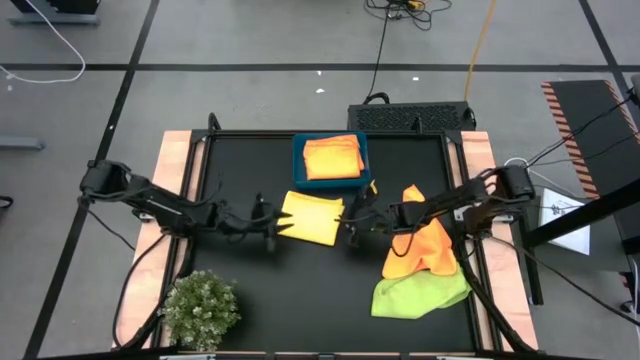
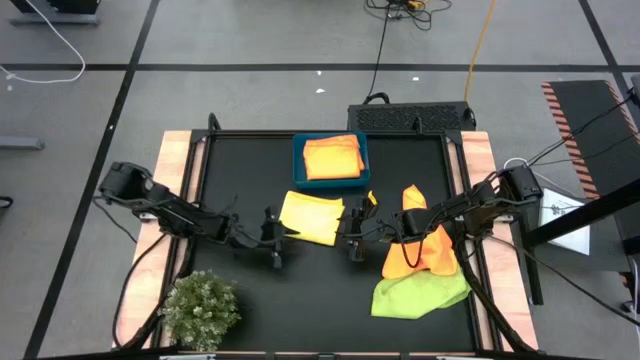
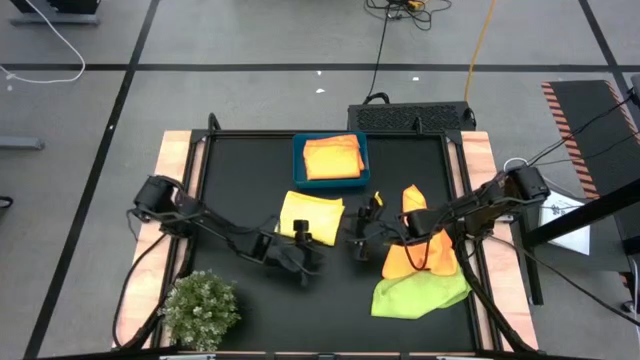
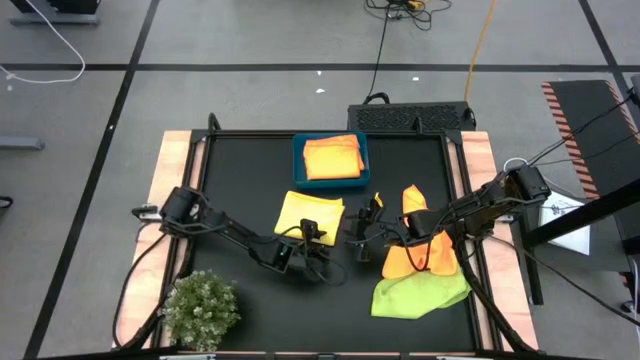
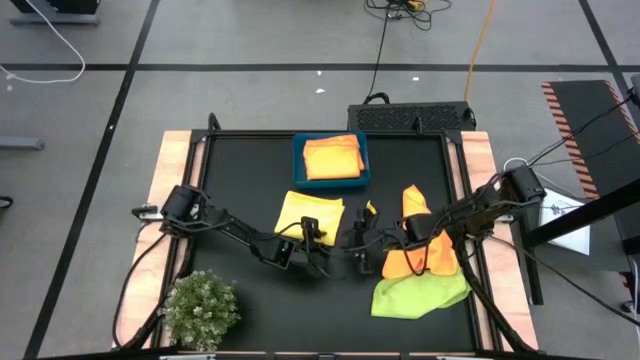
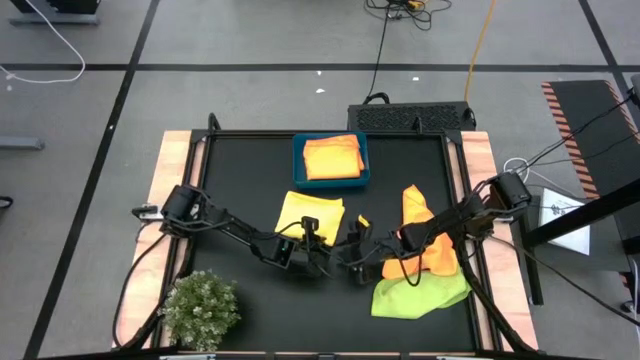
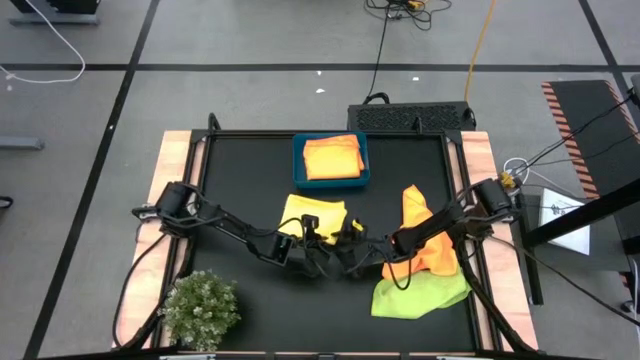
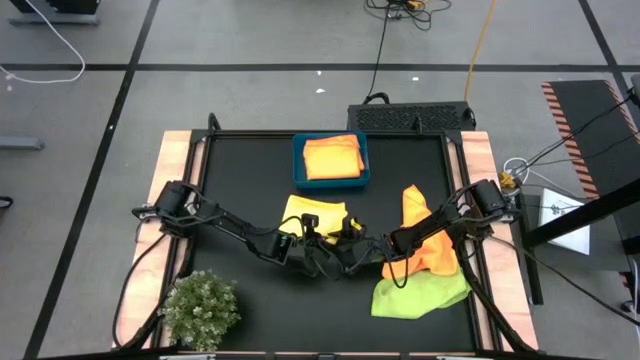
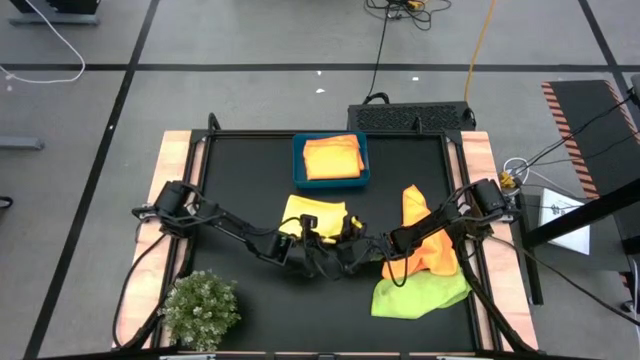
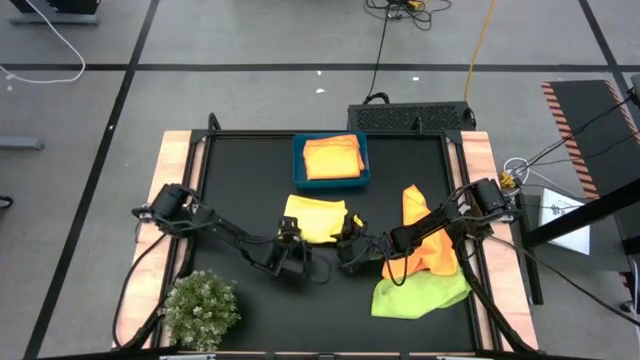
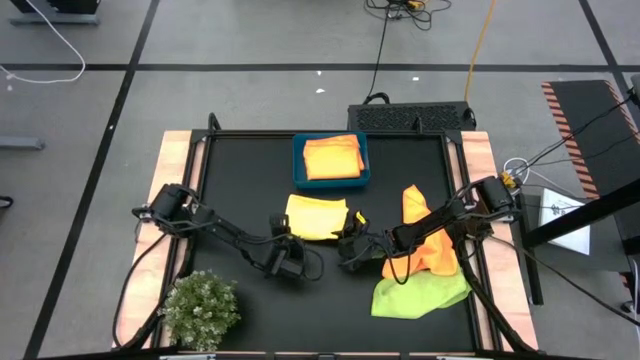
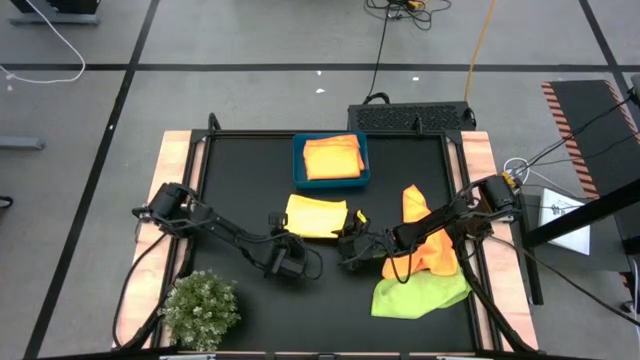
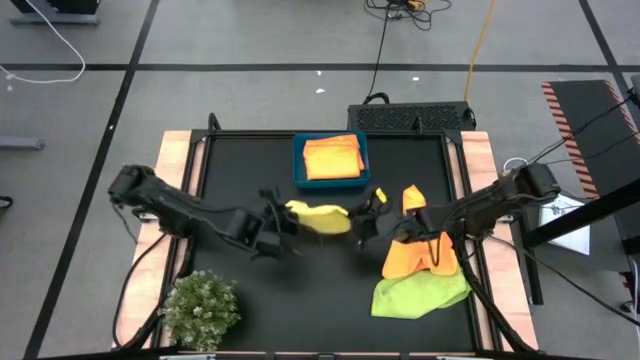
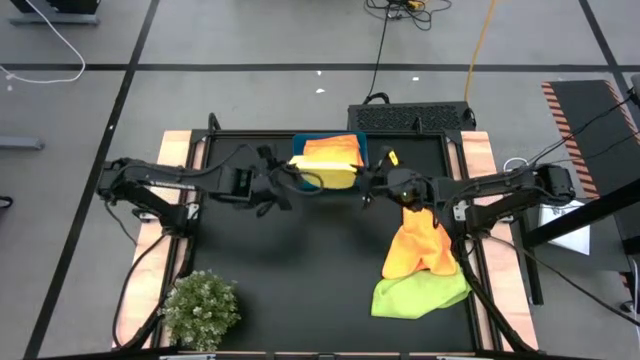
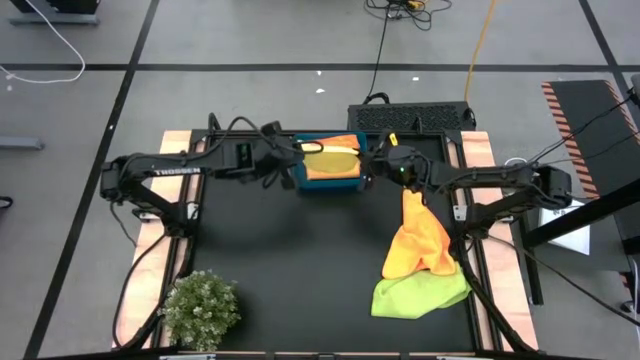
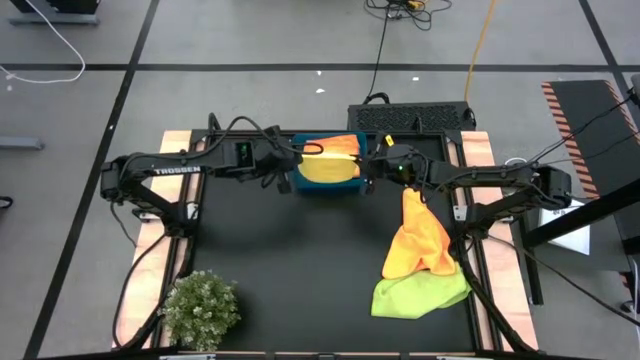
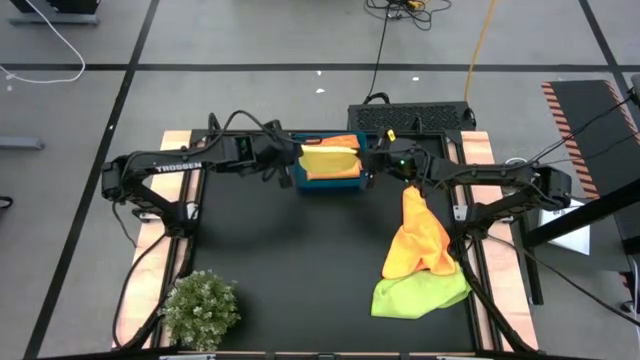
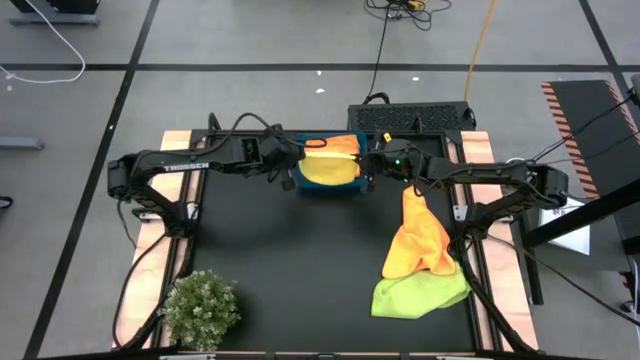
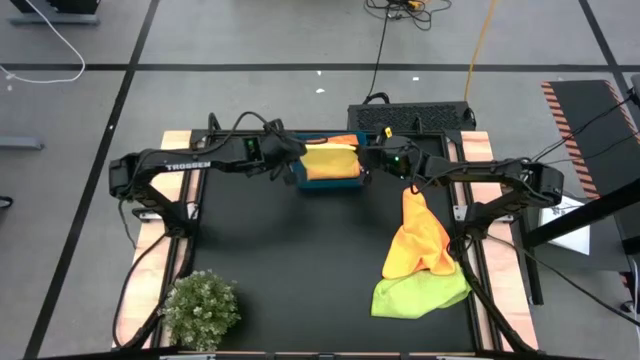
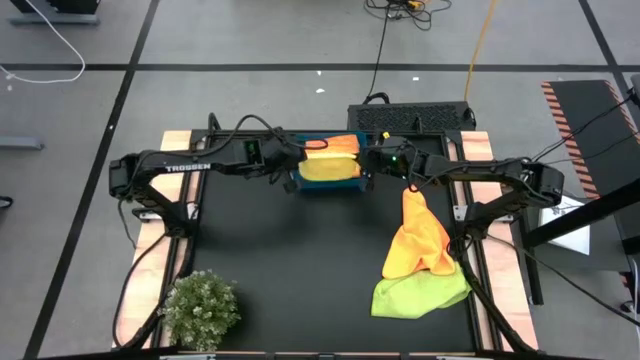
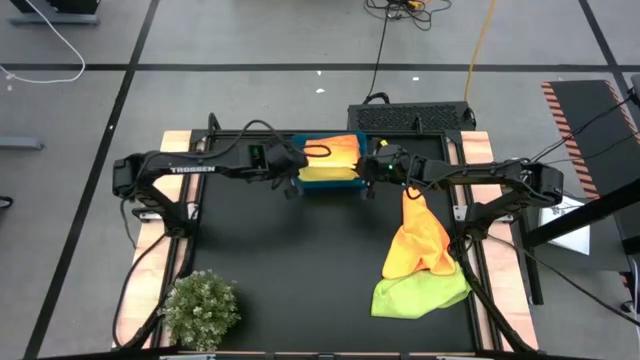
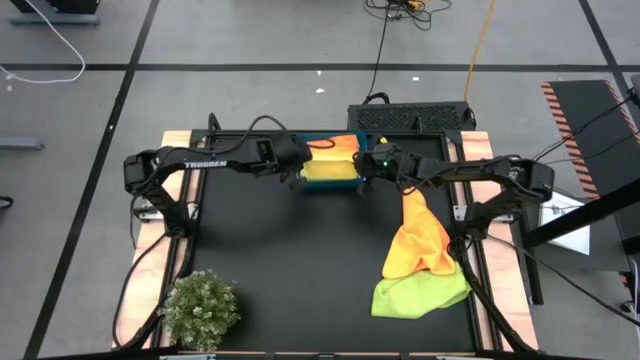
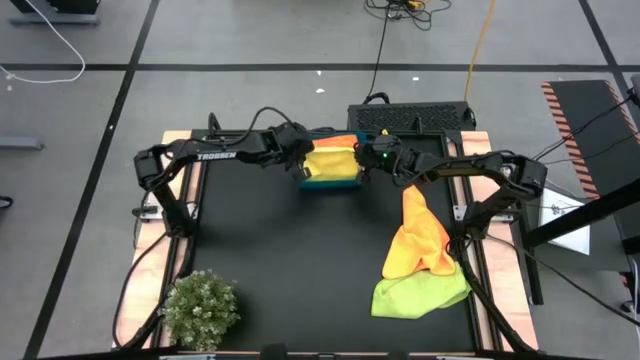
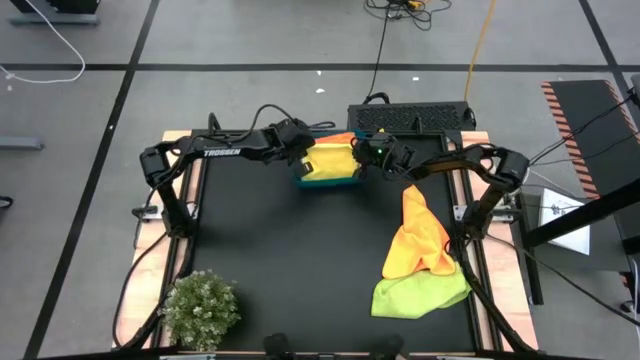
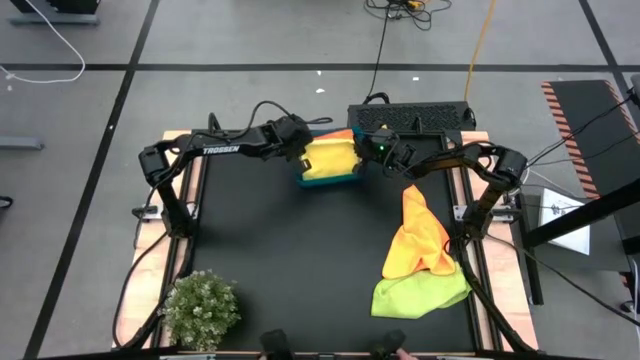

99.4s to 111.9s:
Task: Fold microfiber towels
Put the yellow microfiber towel into the blue bin

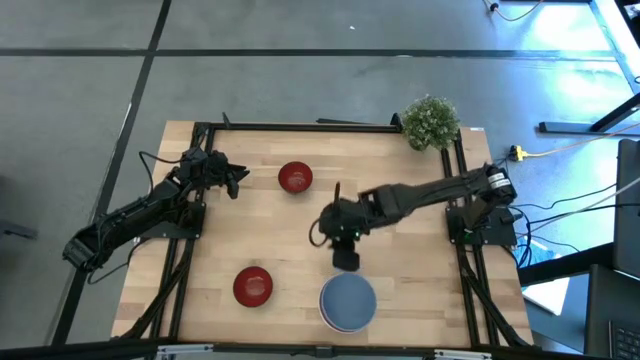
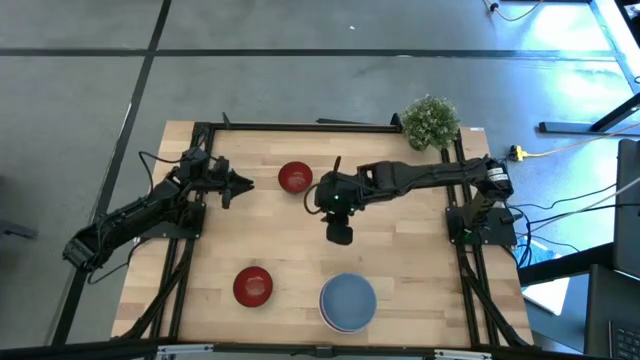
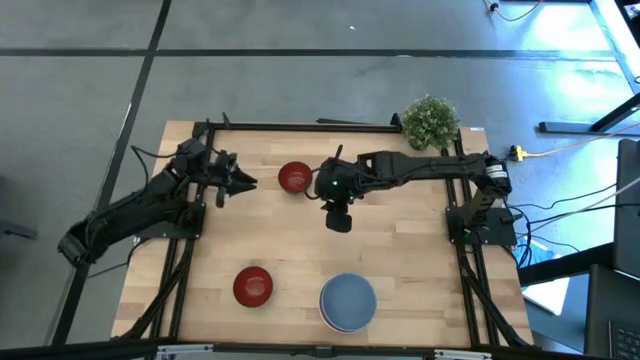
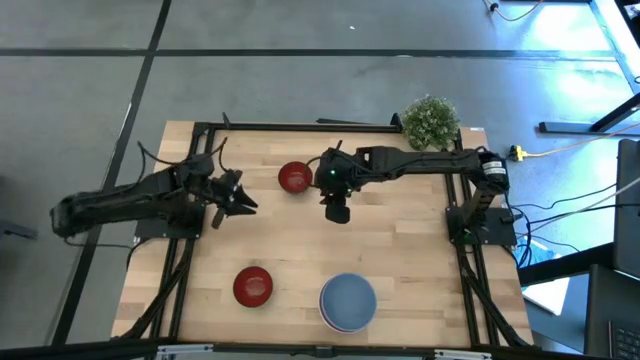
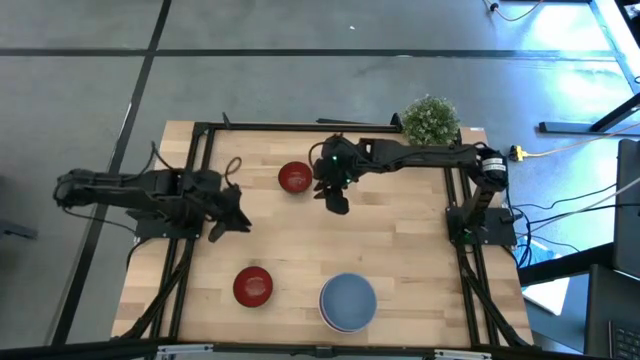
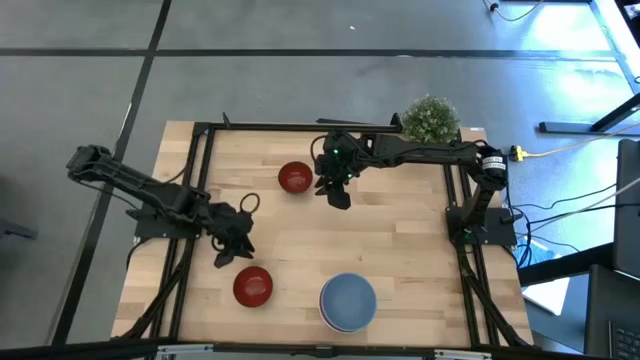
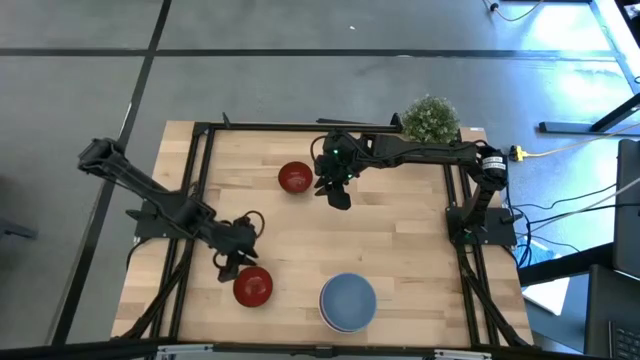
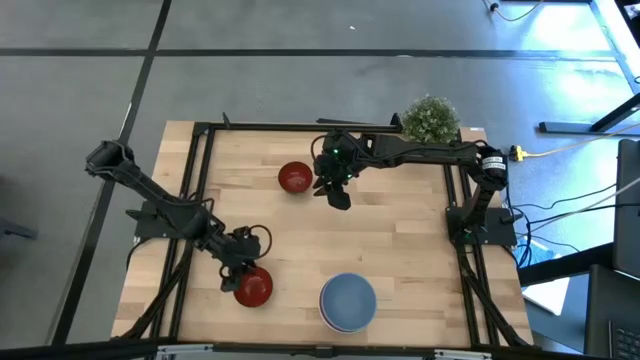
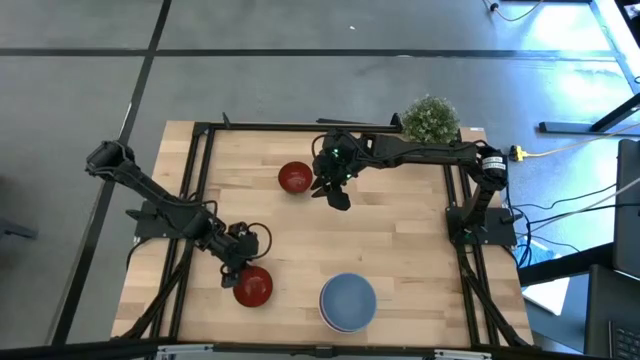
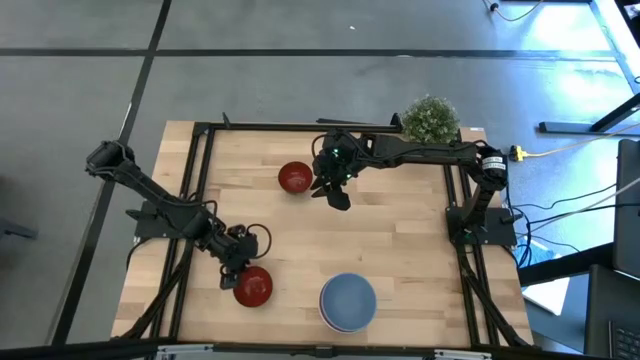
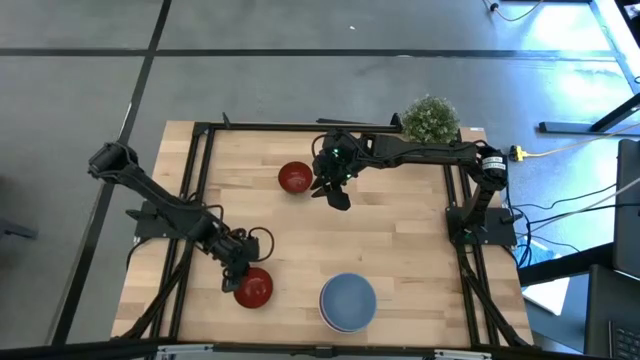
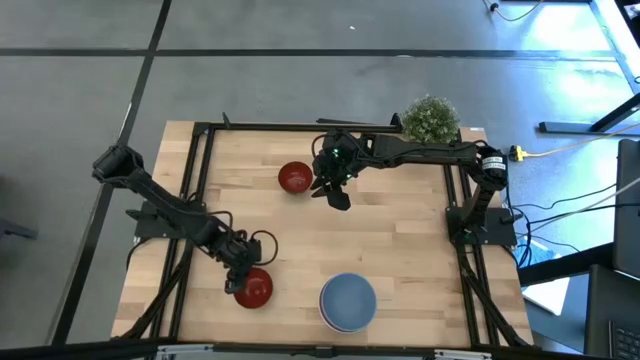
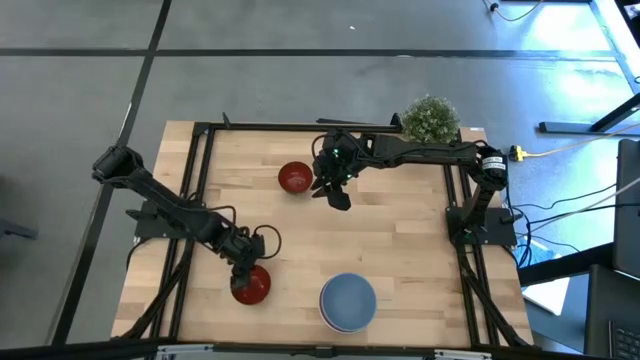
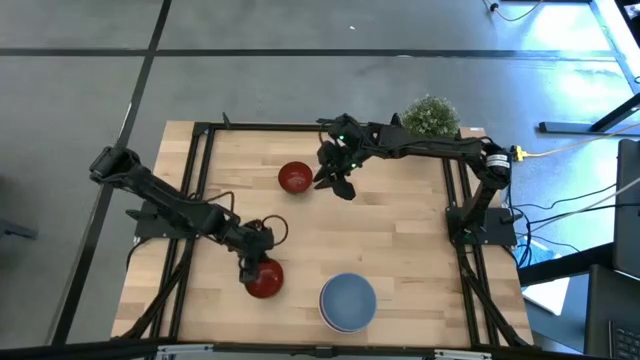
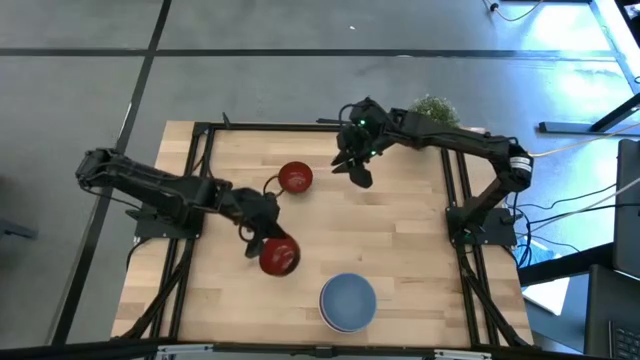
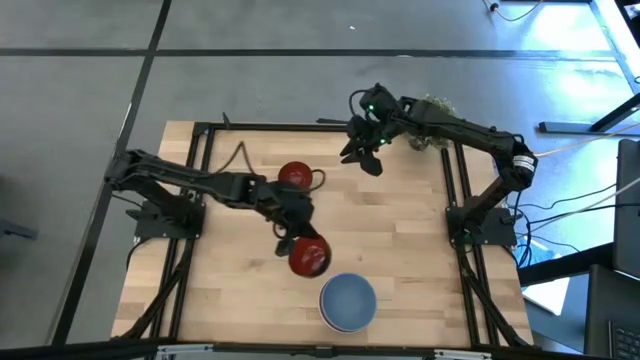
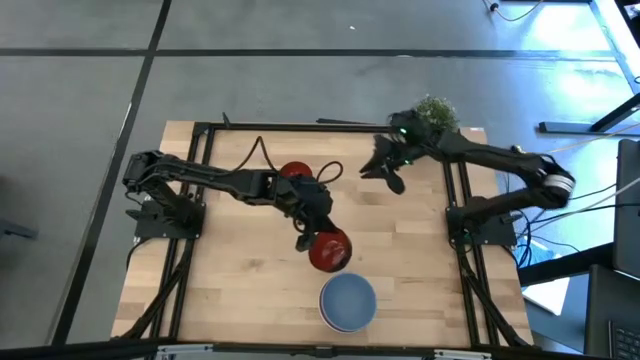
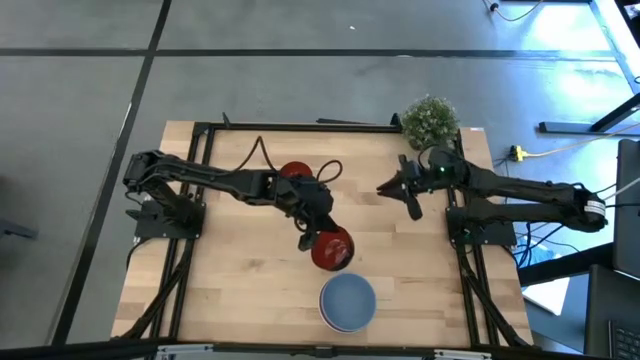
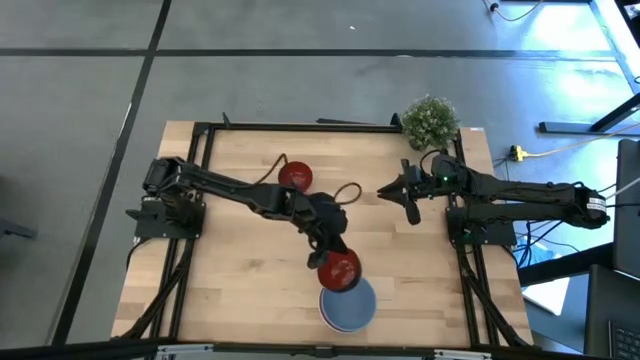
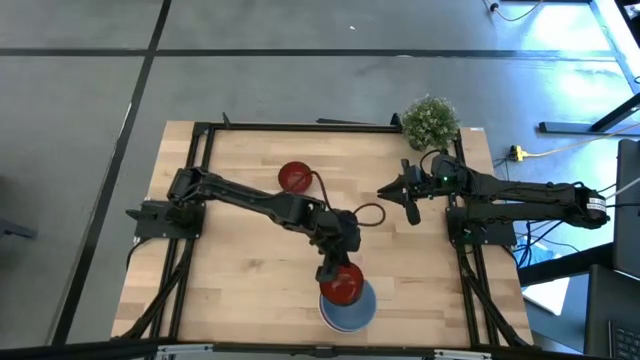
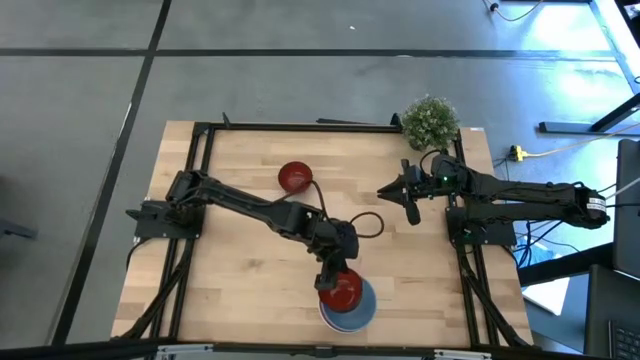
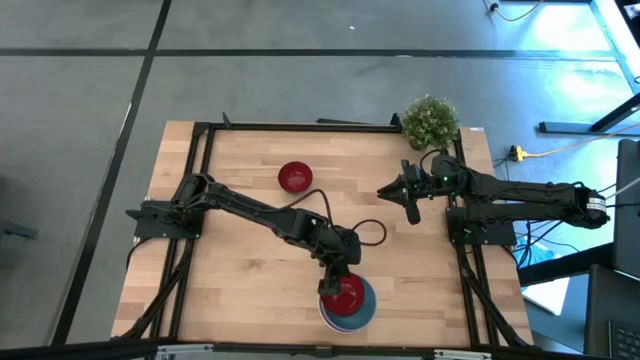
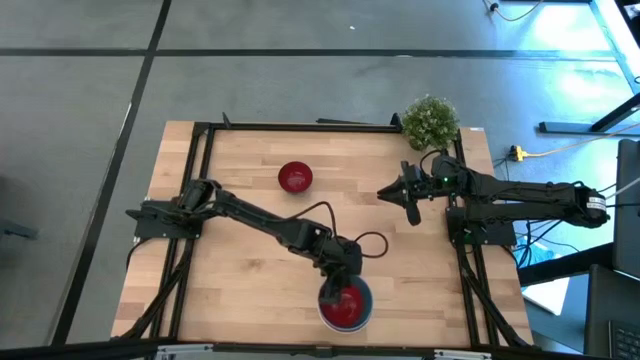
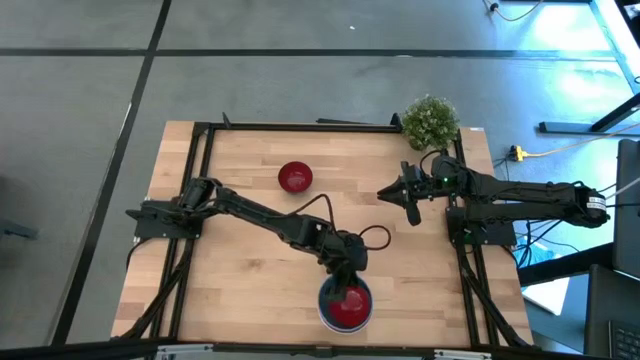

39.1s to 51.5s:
Task: Nest bowls inside each other
Stack the bottom red bowl in the blue bowl
